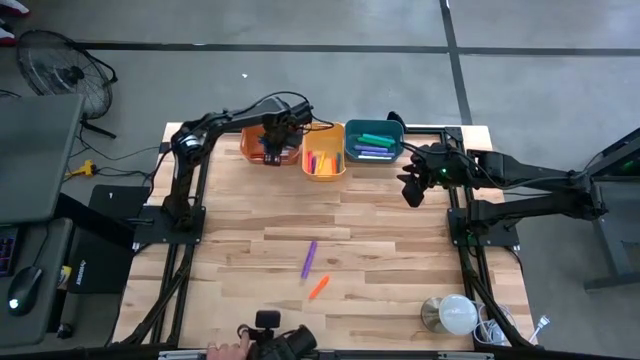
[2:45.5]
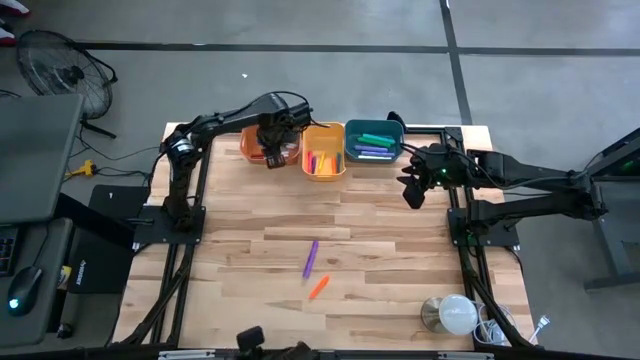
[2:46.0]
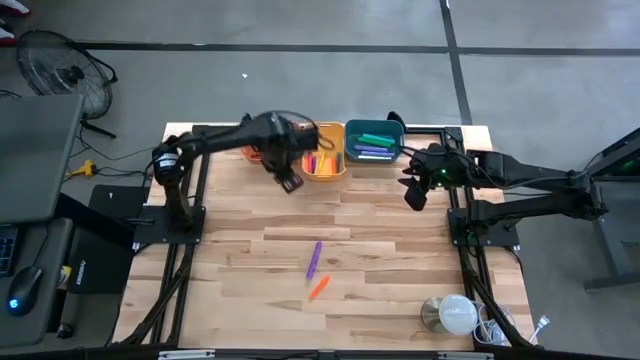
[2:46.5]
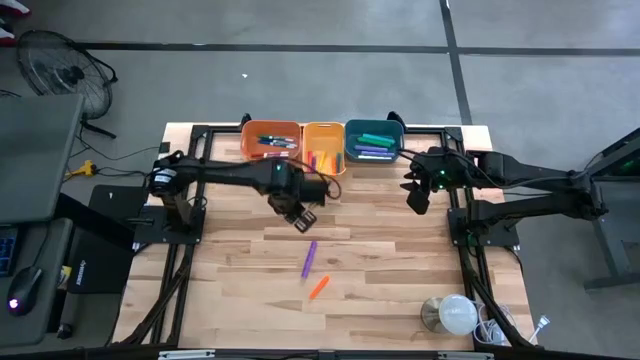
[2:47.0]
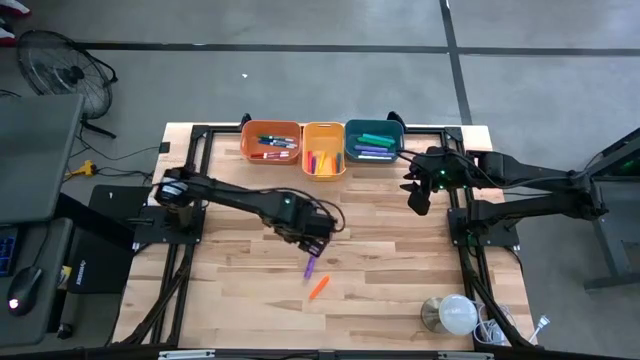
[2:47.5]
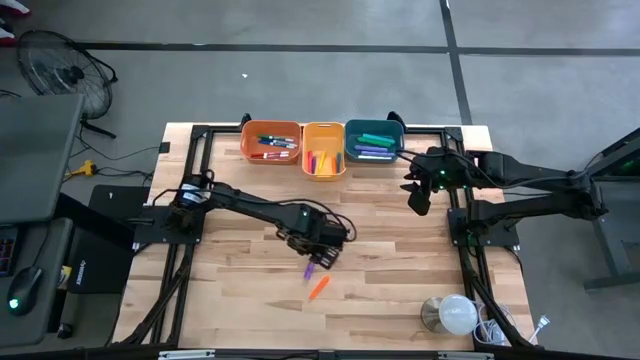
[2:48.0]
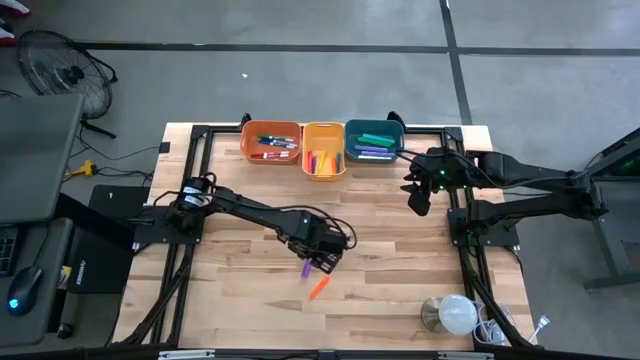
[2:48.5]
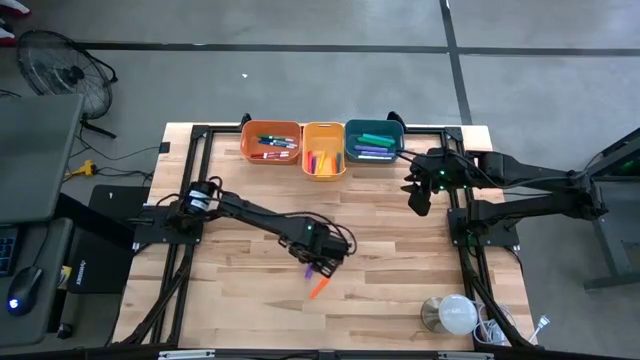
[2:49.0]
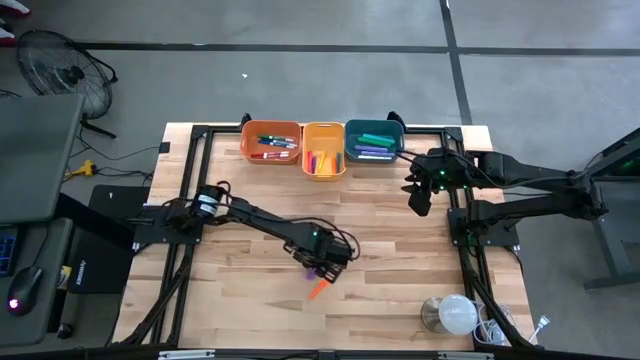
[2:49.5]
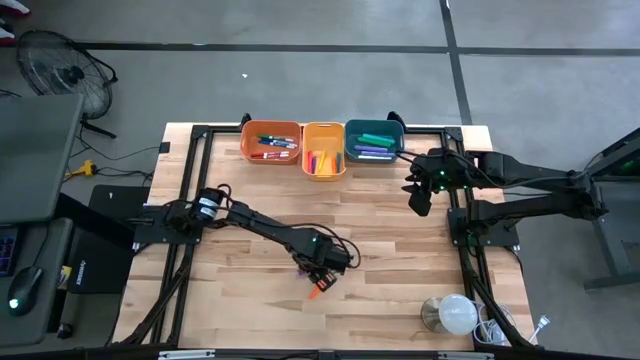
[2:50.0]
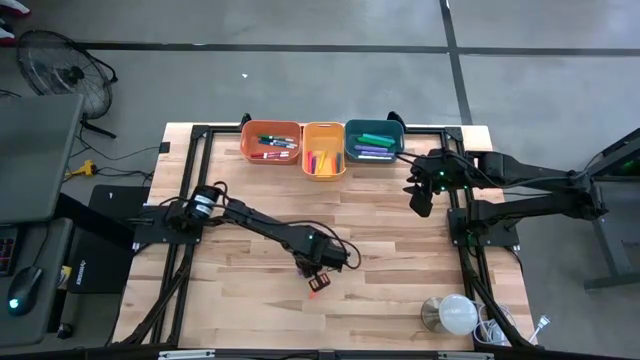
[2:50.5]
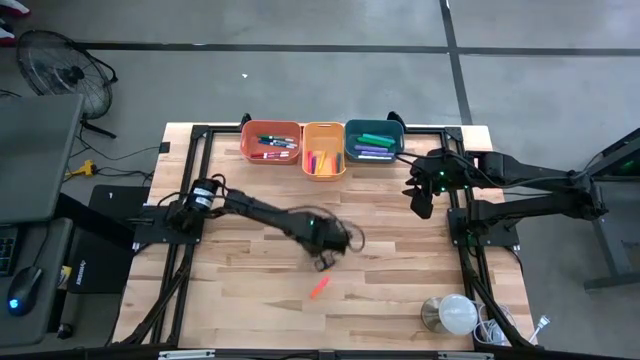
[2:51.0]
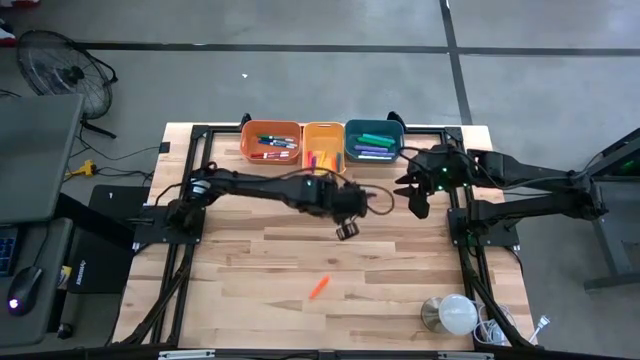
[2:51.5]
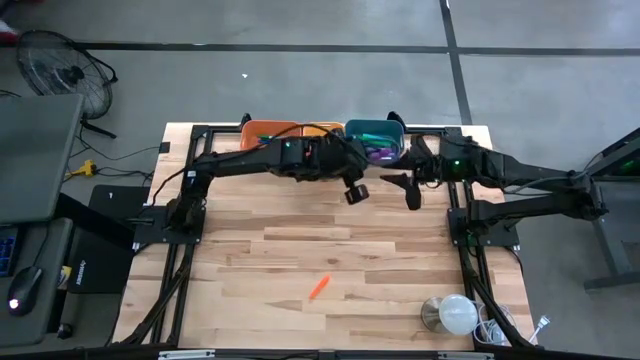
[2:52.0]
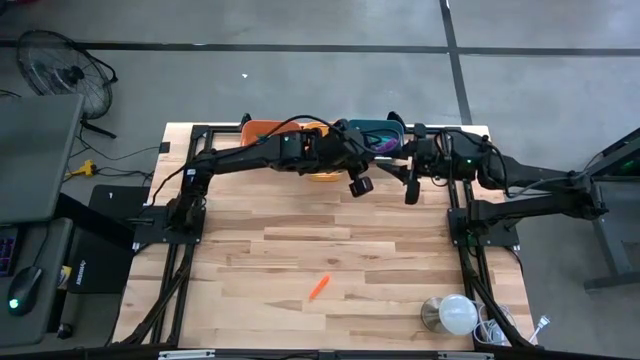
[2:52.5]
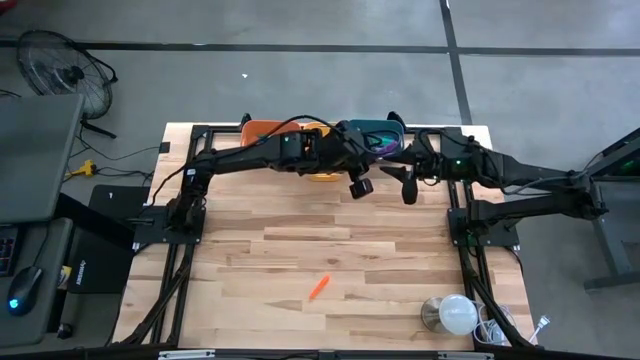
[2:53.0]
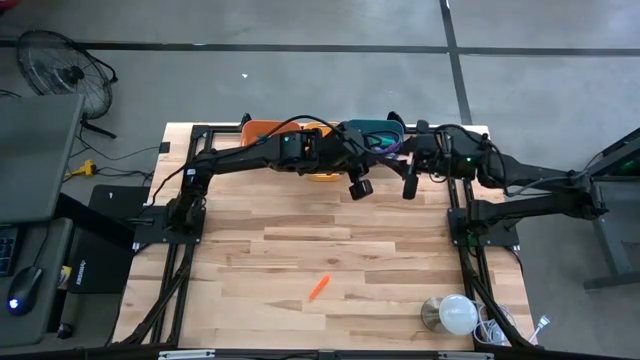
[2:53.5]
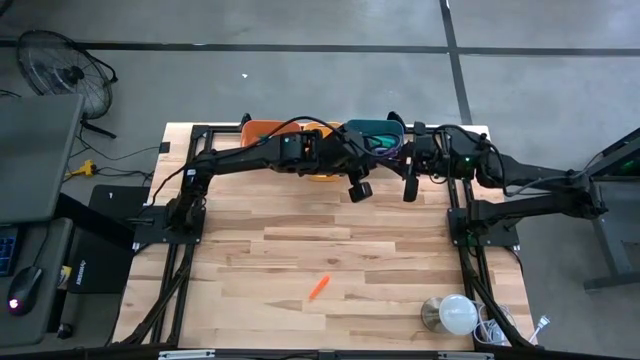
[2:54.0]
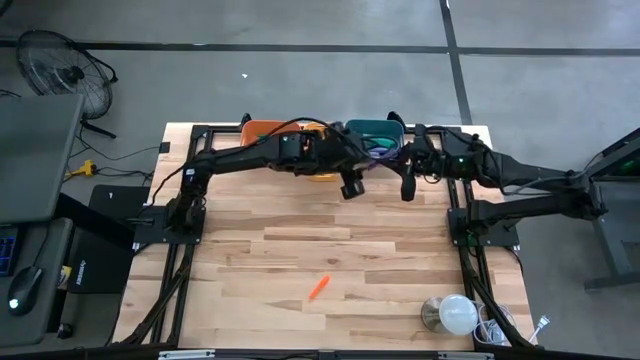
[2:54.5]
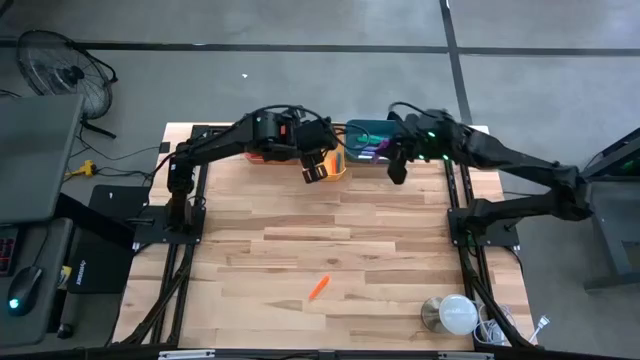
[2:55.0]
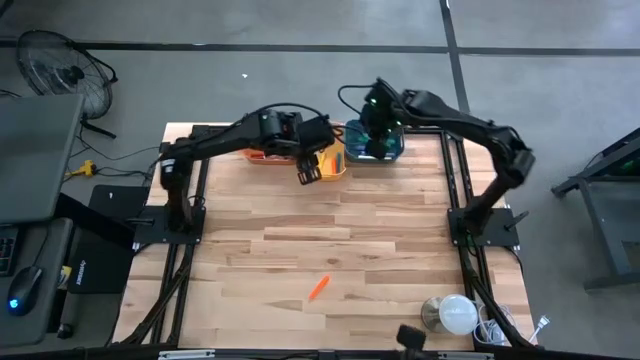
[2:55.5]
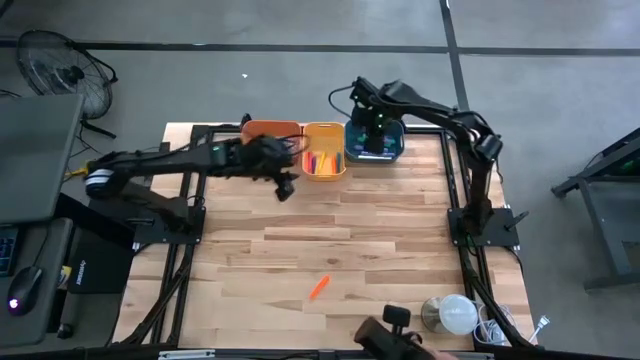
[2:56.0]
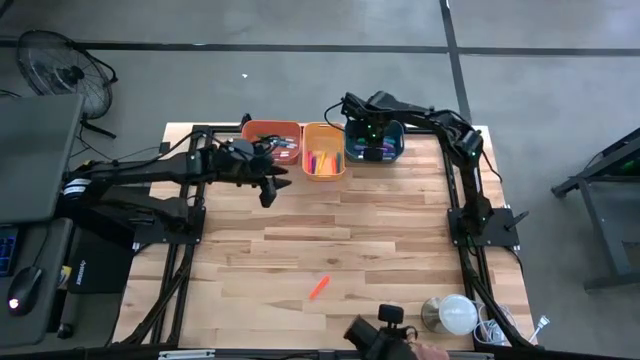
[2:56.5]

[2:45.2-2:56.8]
Task: Pick & Place Markers
Put the dark purple highlighter into the blue bin

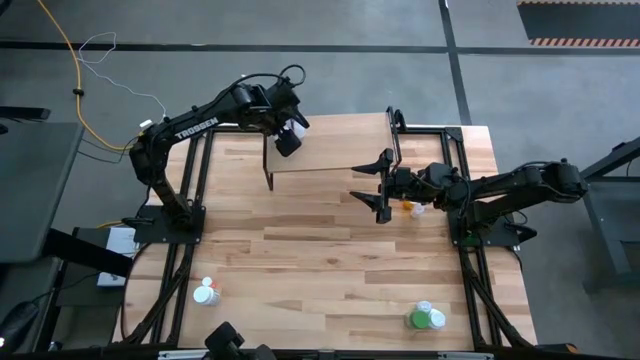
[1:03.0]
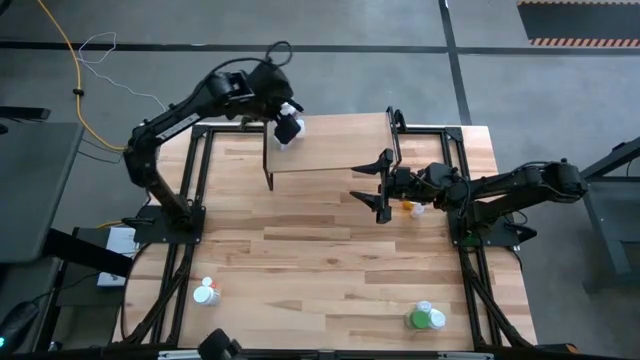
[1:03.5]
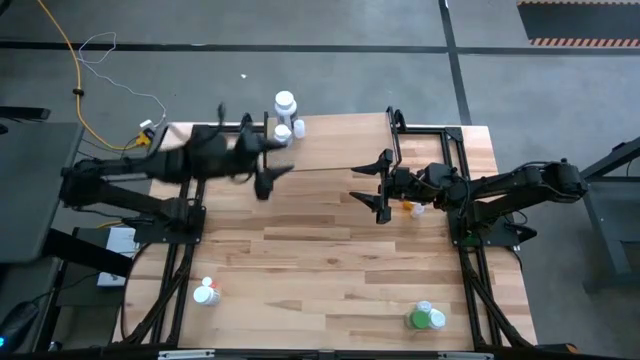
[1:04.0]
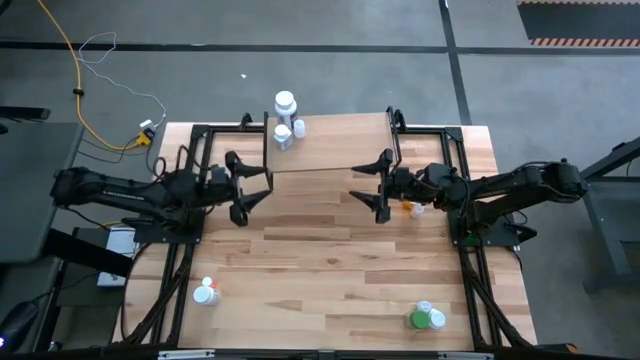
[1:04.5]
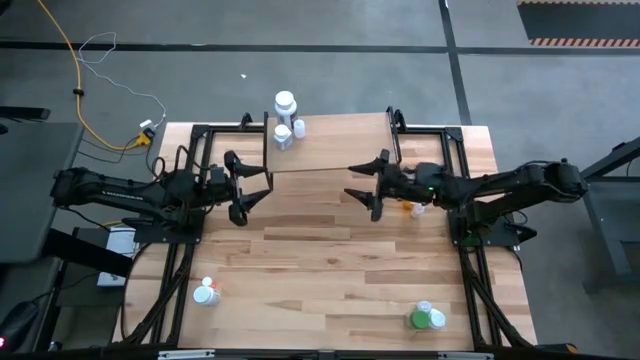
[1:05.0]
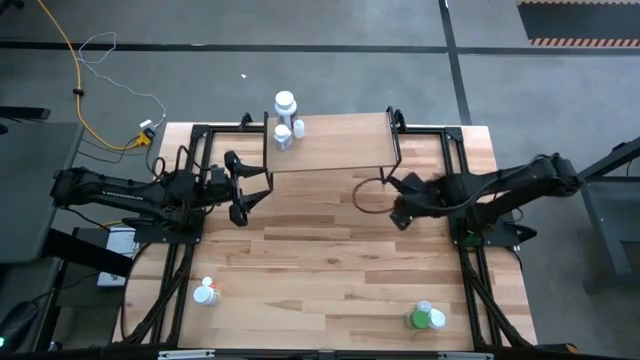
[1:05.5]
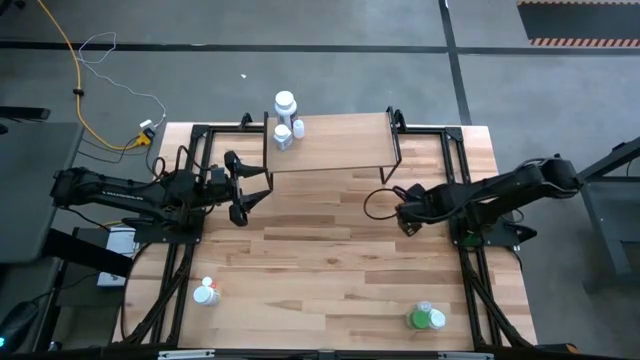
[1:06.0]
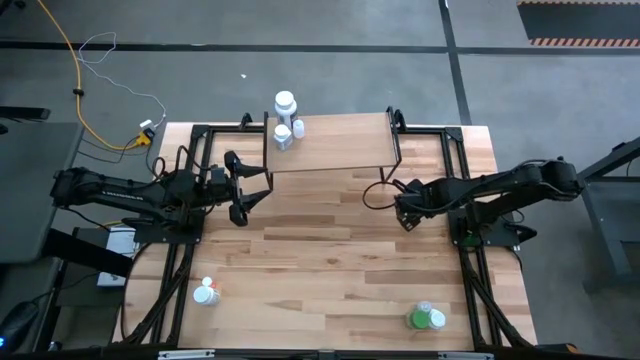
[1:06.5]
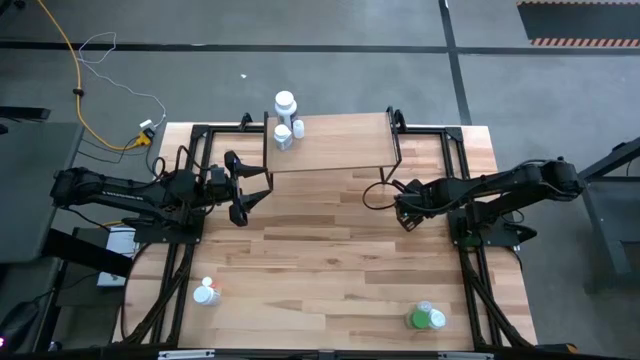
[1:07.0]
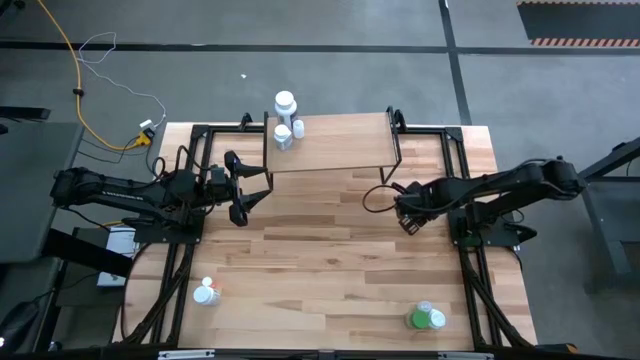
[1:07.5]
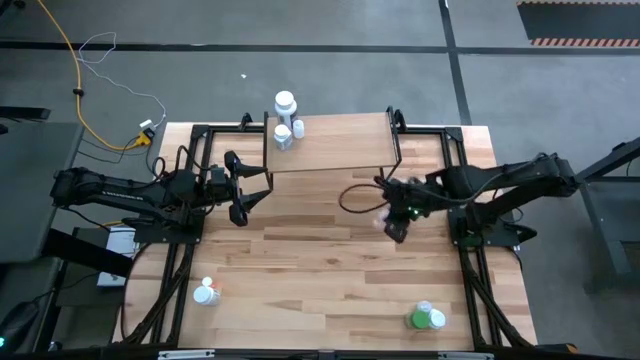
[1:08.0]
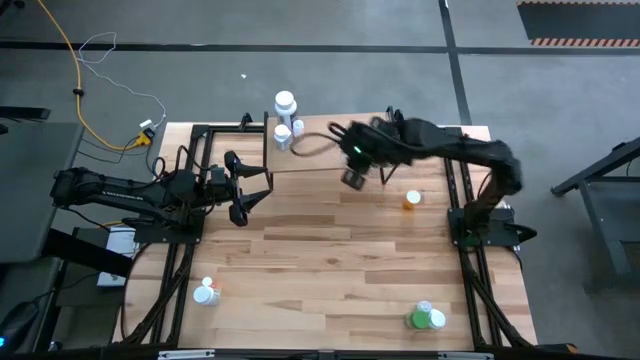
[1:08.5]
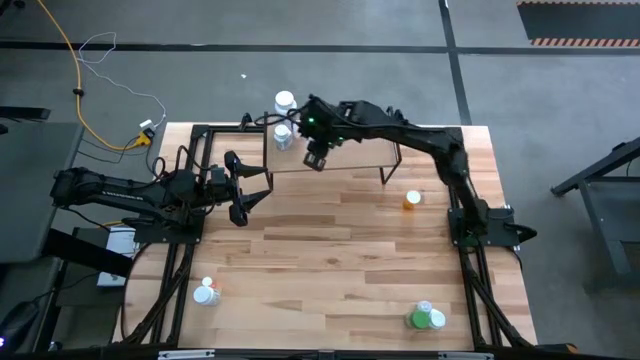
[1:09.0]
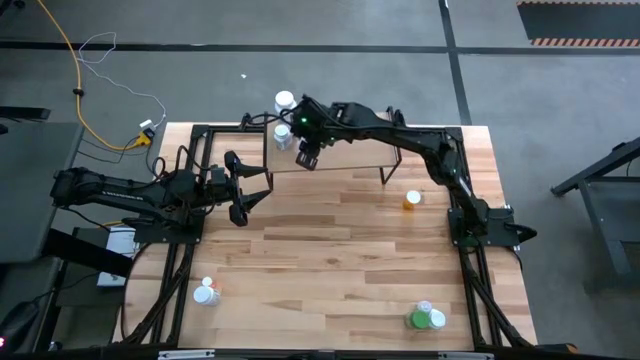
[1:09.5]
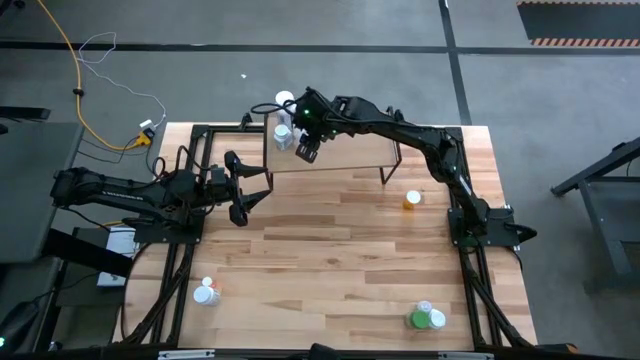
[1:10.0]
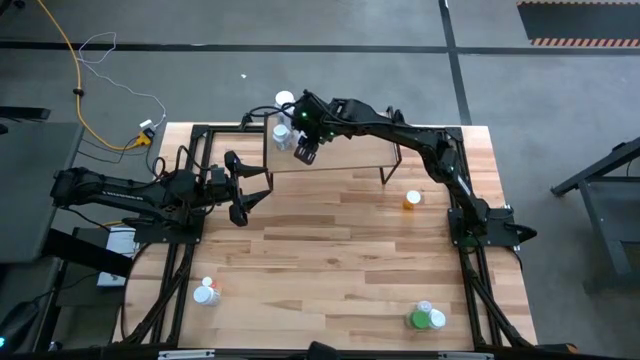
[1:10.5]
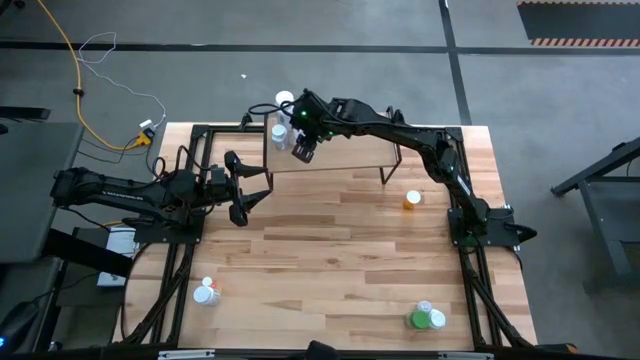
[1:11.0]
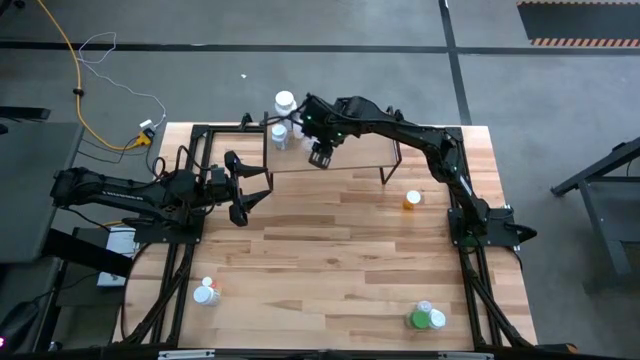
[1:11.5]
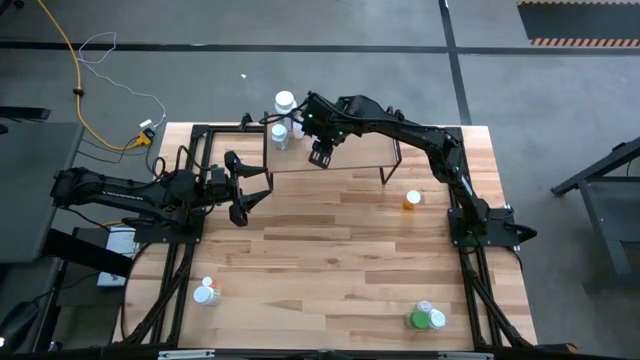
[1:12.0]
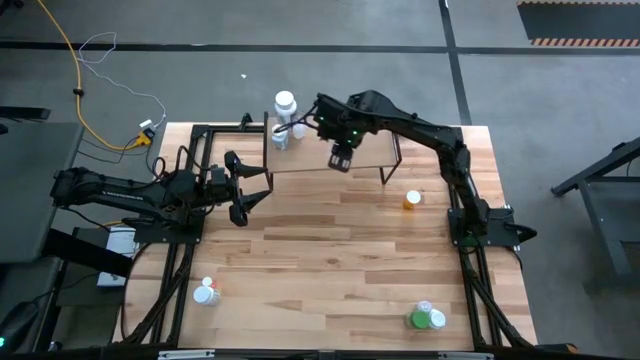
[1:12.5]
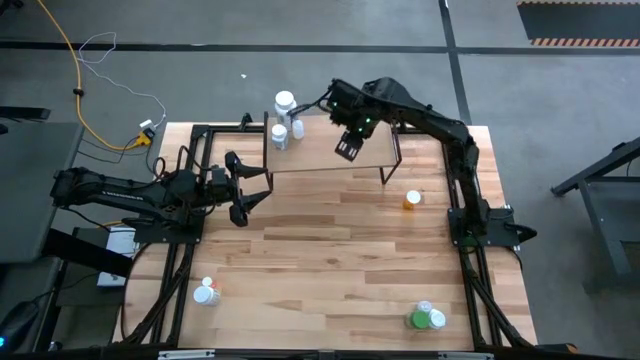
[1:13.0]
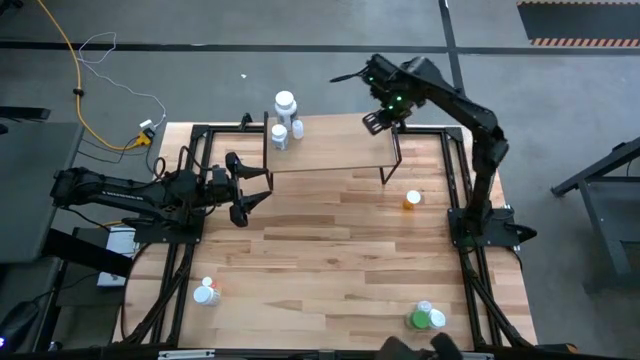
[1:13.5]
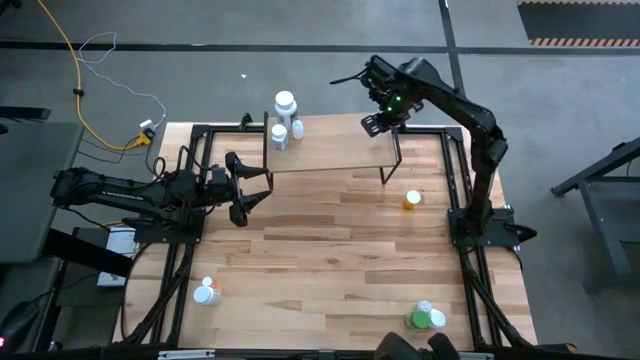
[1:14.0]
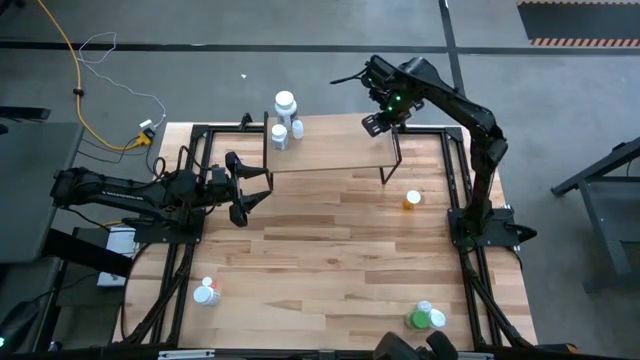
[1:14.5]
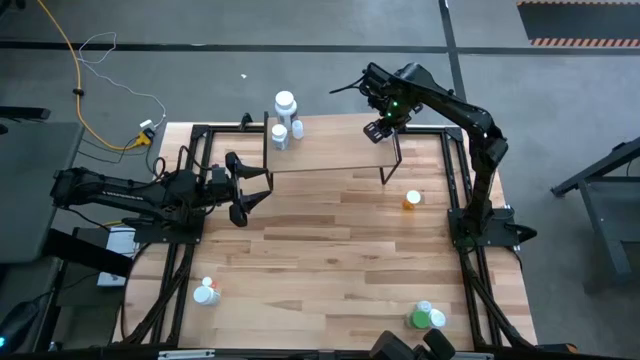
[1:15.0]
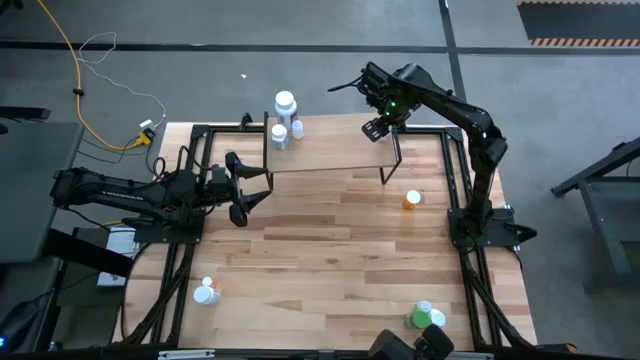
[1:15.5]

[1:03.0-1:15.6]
Task: Pick and place medicine bottles onto shelf by color
Put the top white pill bottle on the shelf
